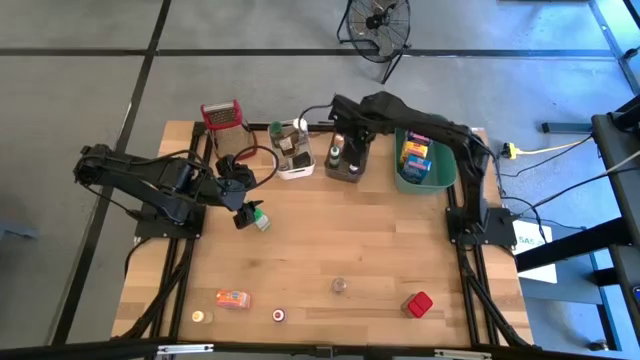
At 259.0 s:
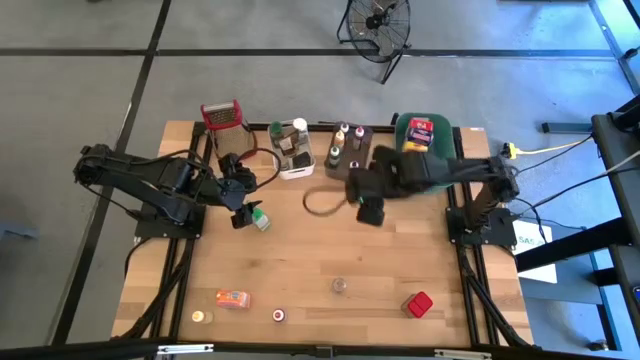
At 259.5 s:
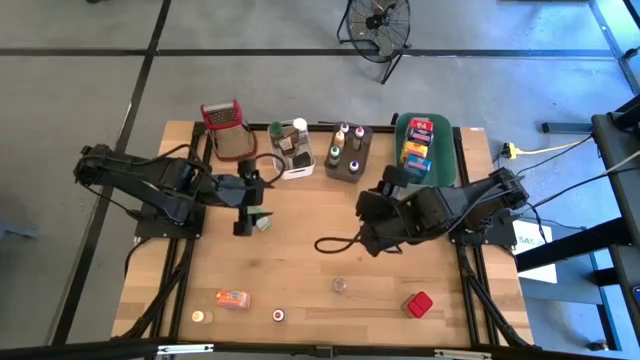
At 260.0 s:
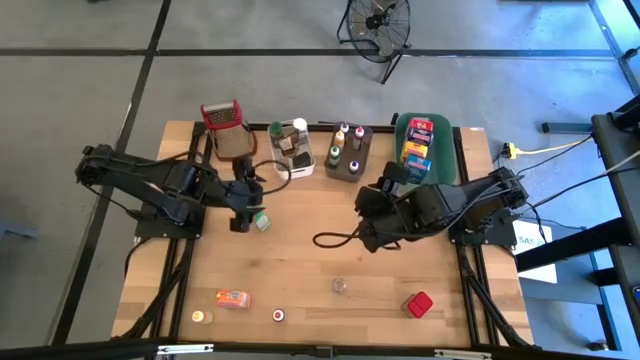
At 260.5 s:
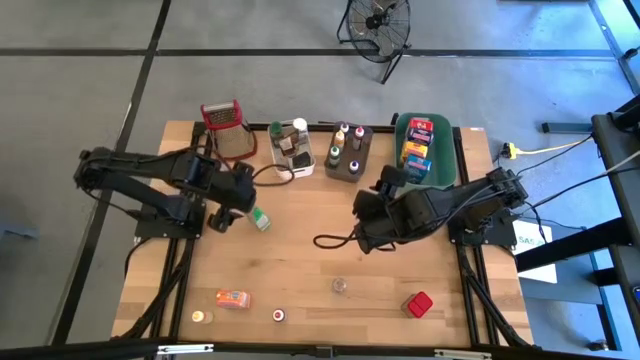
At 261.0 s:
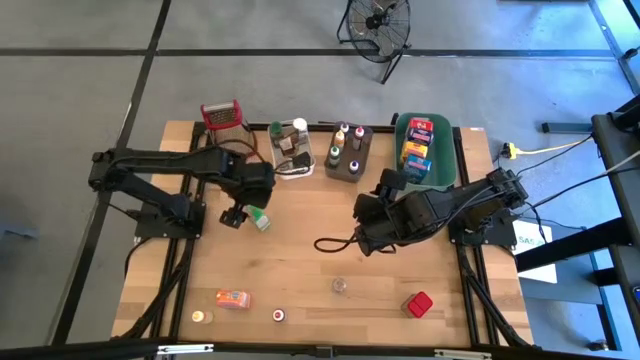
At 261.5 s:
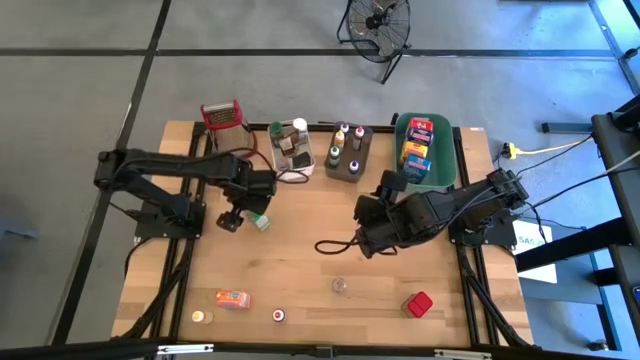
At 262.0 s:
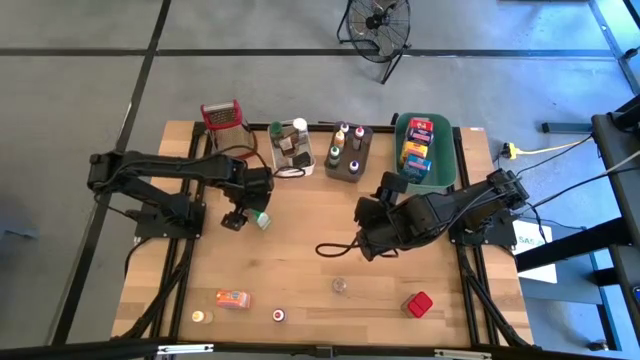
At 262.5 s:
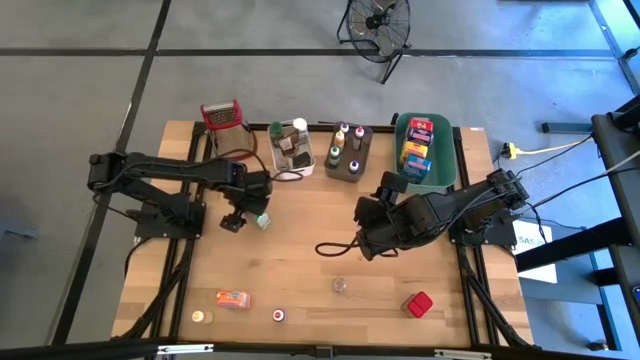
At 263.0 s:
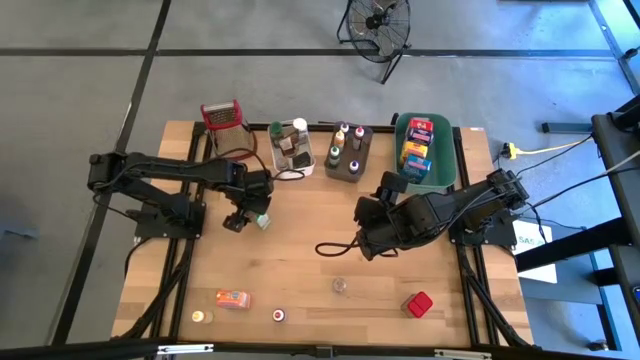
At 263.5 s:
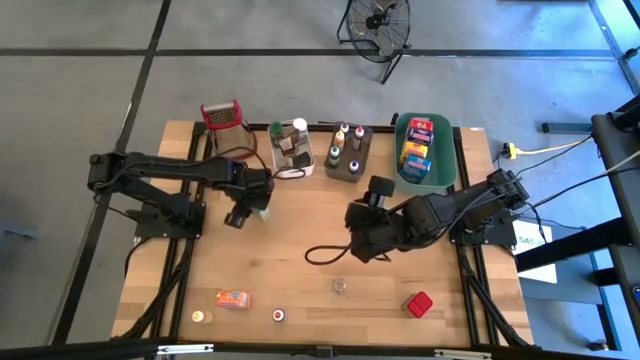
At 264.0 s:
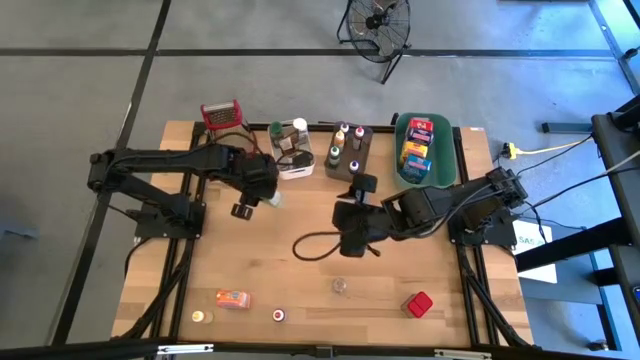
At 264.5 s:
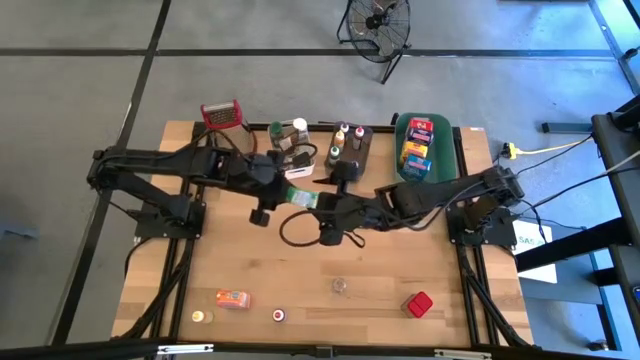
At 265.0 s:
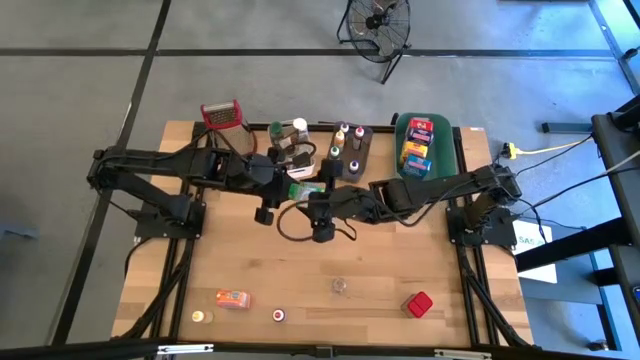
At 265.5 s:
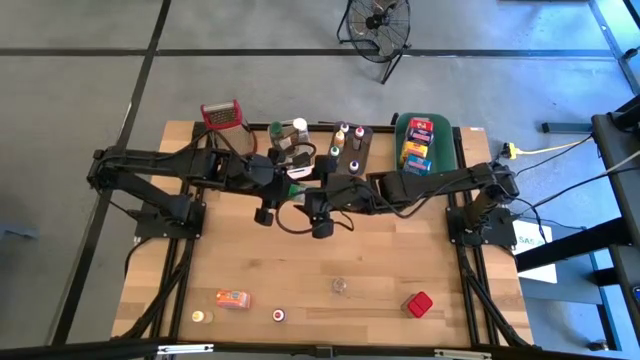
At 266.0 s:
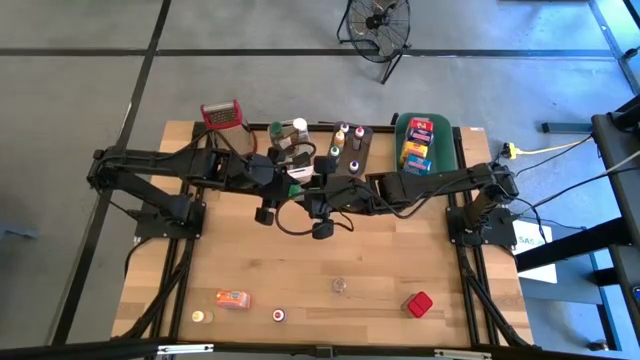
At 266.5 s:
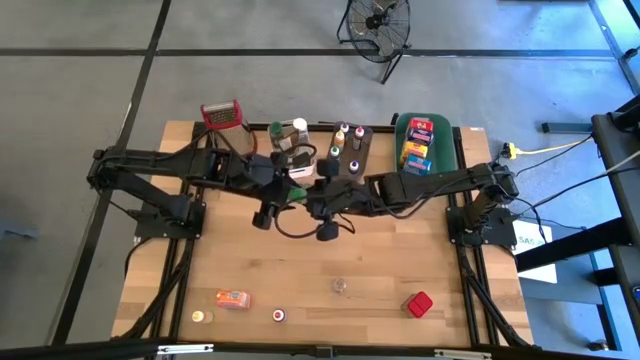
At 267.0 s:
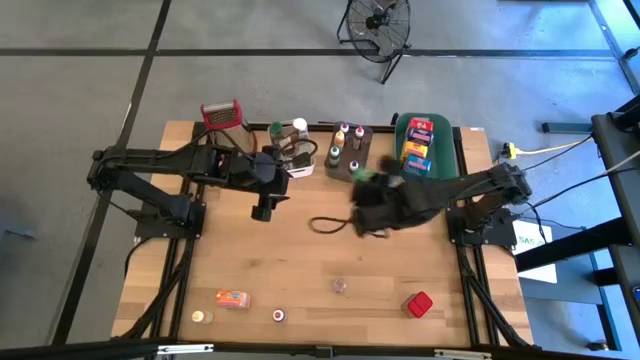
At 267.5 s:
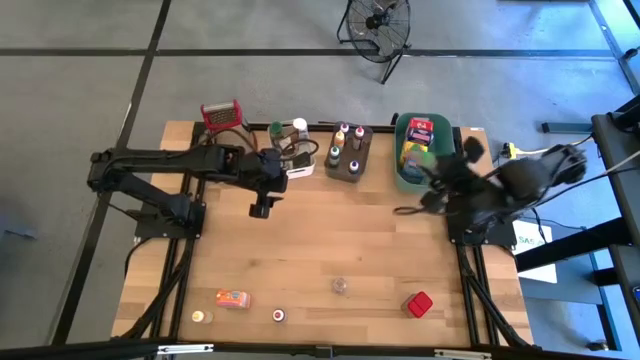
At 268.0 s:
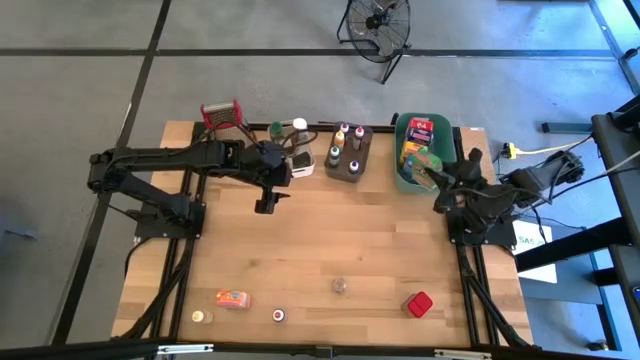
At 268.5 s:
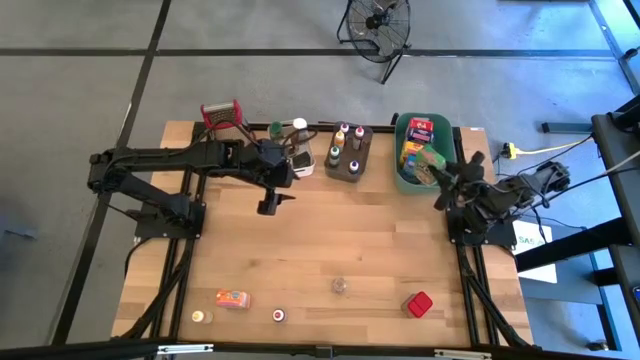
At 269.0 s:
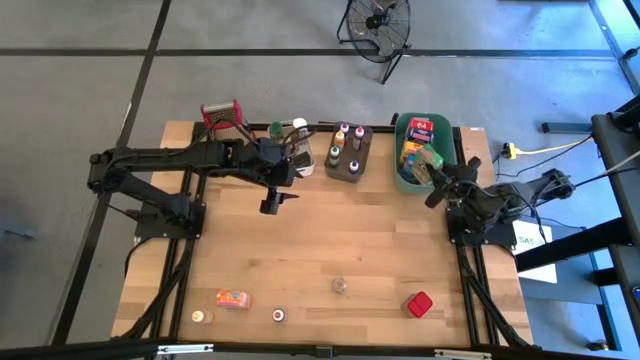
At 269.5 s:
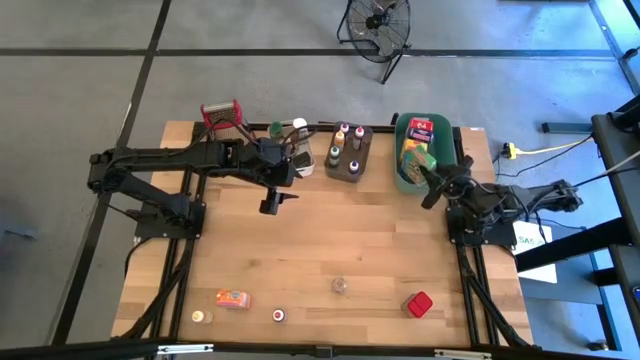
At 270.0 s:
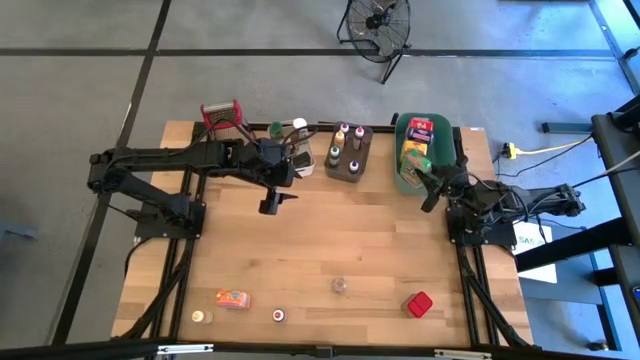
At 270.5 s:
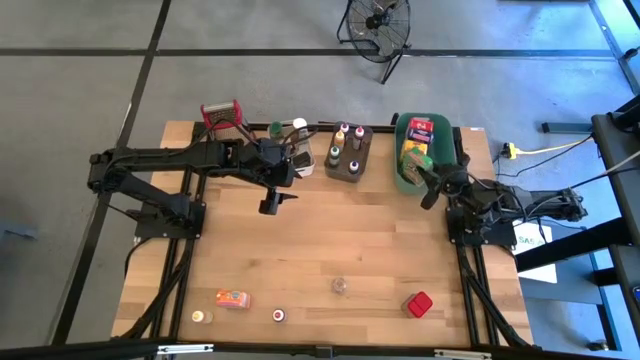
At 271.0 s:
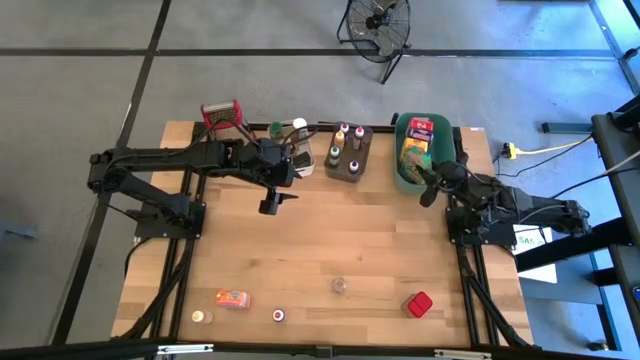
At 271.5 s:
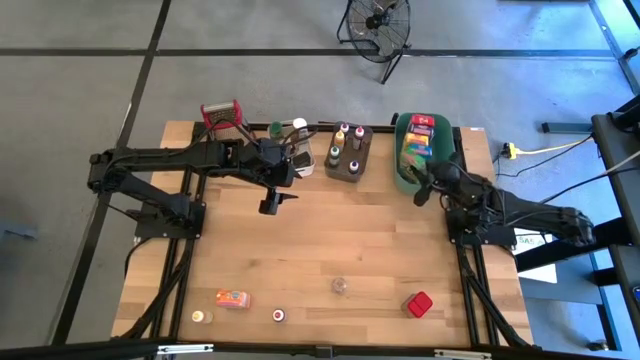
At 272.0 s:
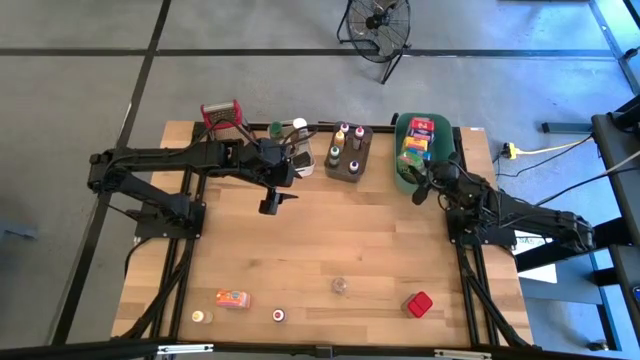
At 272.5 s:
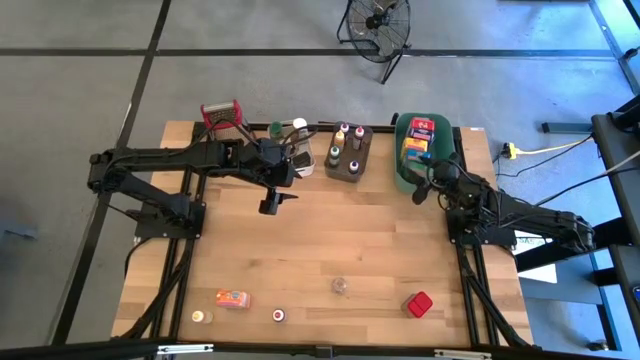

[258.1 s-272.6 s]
Task: Pick & Place Kitchen Items
Put the green cereal box into the green bin
